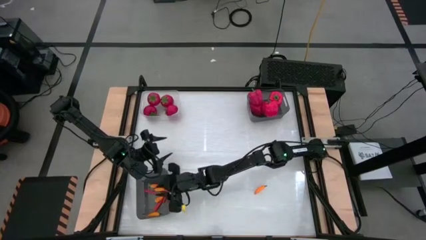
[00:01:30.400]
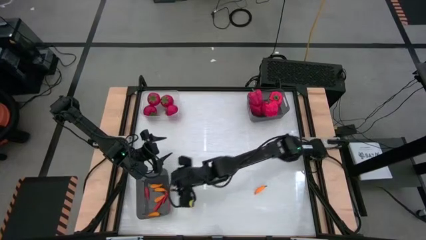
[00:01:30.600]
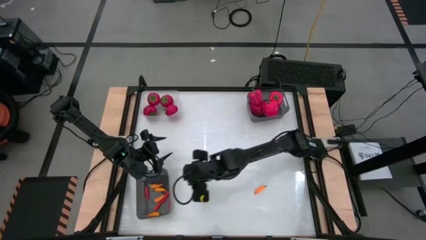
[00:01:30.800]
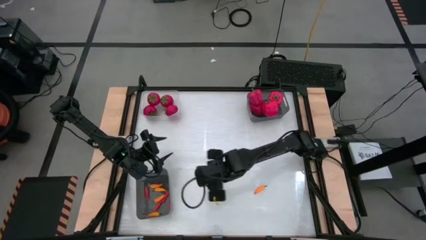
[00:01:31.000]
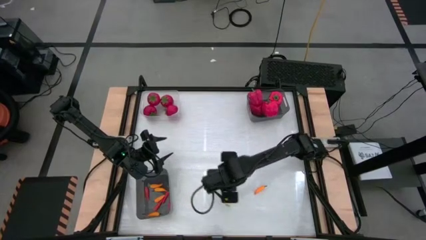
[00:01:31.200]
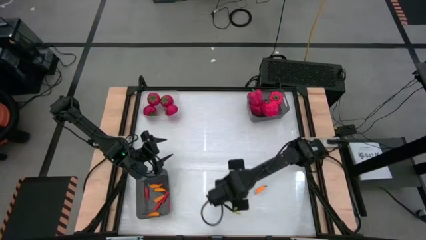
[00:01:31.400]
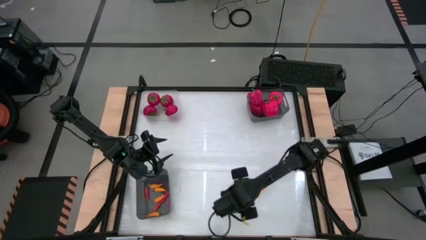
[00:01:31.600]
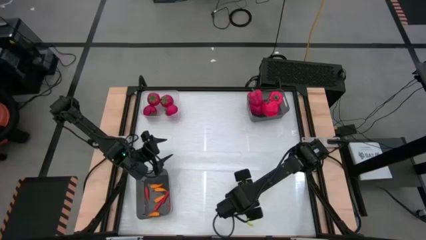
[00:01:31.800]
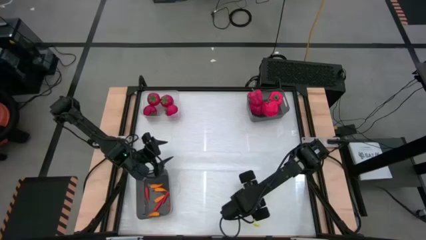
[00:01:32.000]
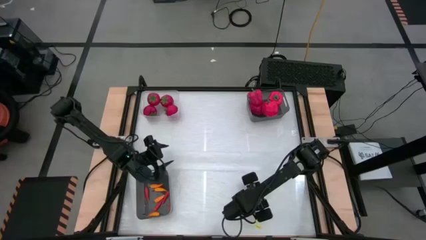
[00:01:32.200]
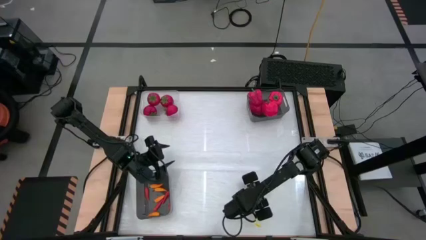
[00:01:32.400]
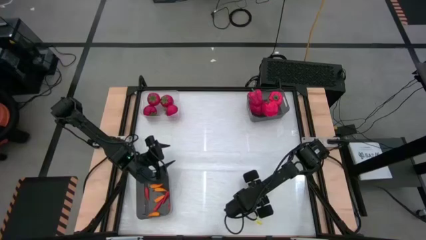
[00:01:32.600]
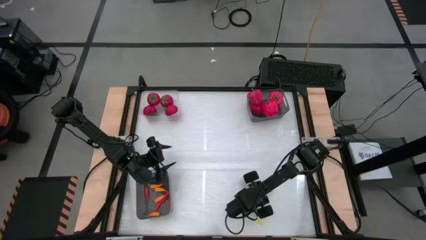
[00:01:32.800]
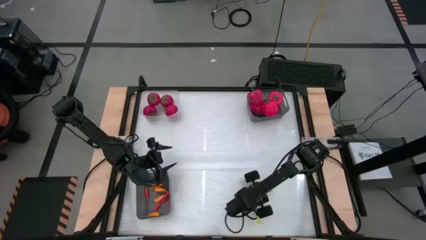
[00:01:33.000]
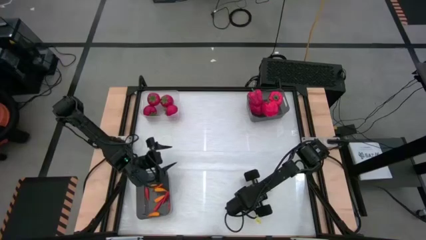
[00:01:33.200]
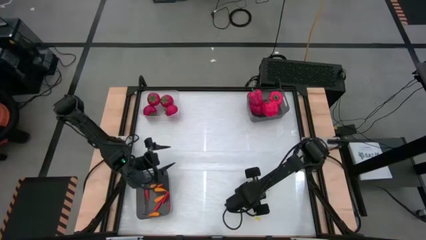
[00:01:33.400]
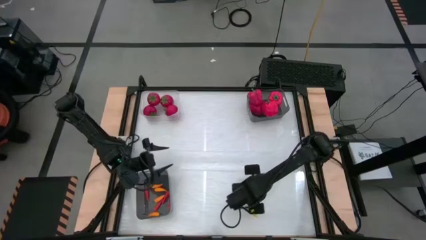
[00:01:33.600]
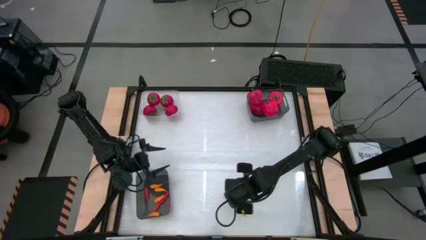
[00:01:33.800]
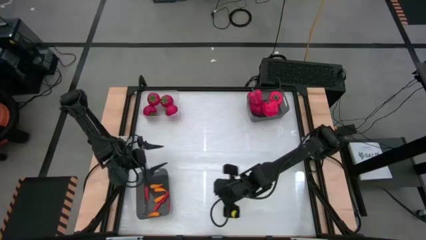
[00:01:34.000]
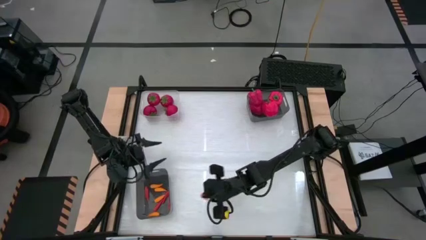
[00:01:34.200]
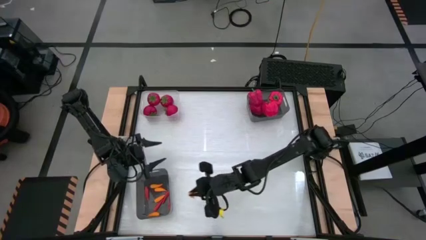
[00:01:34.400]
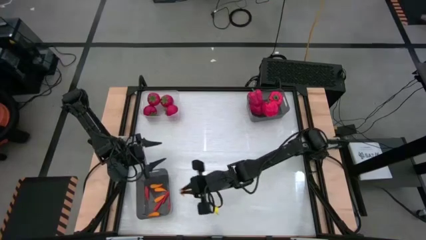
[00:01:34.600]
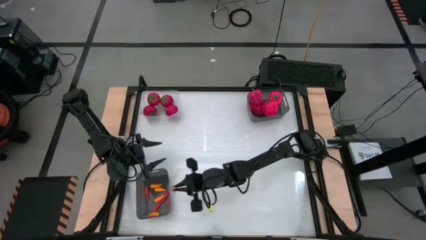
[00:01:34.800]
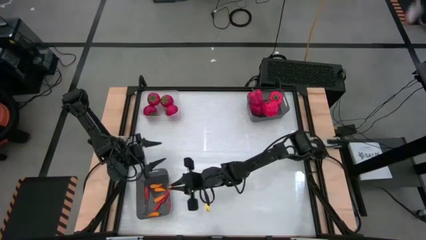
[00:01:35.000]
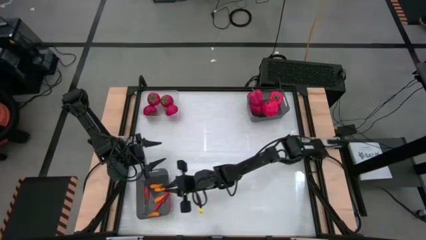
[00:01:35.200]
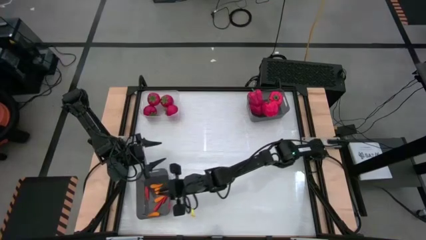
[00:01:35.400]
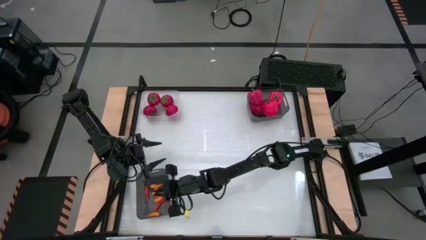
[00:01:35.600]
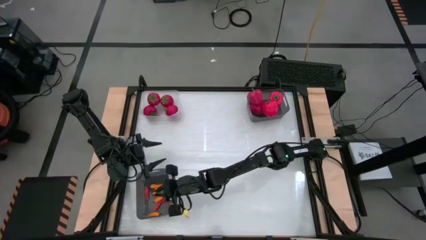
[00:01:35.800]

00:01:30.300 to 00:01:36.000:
Task: Sort produce into baskets
Put the yellow chili pepper into the bottom black bin

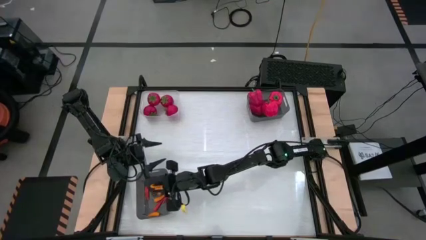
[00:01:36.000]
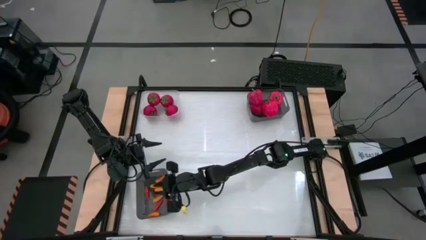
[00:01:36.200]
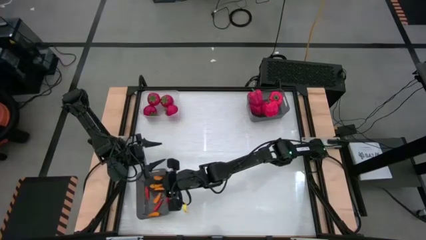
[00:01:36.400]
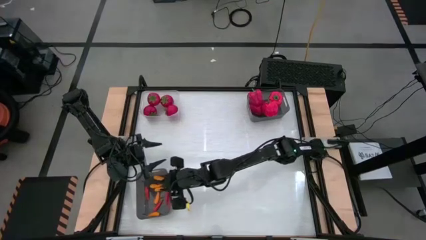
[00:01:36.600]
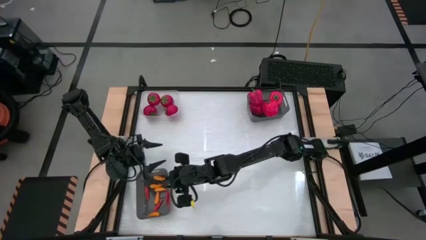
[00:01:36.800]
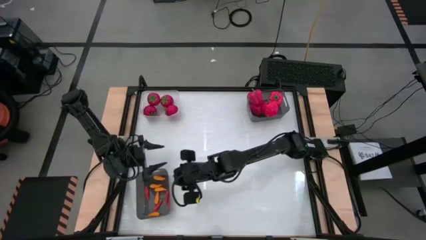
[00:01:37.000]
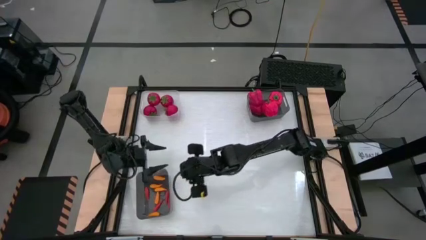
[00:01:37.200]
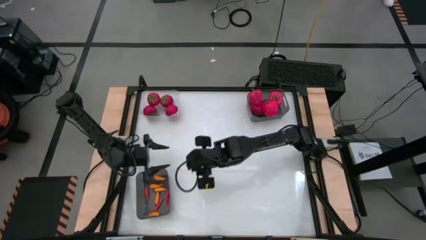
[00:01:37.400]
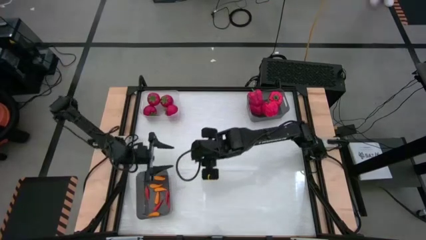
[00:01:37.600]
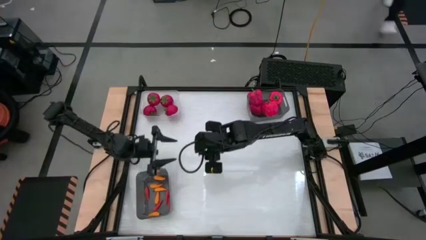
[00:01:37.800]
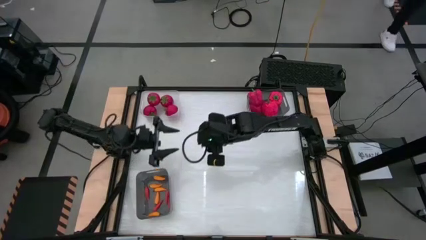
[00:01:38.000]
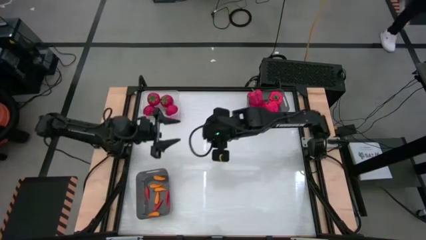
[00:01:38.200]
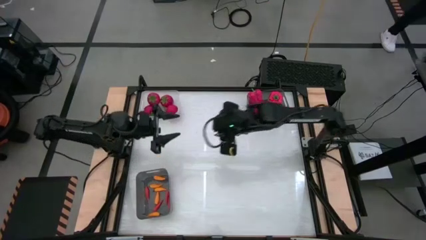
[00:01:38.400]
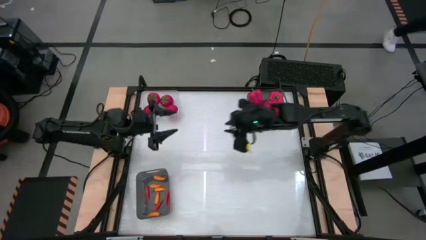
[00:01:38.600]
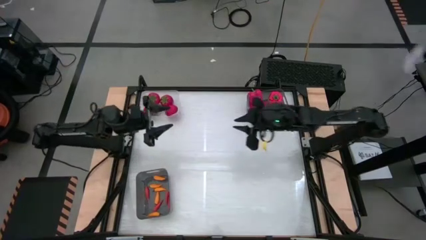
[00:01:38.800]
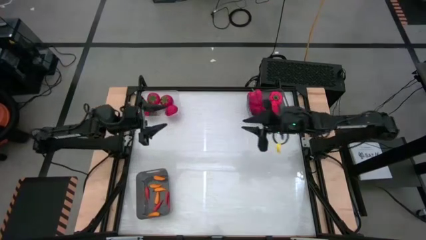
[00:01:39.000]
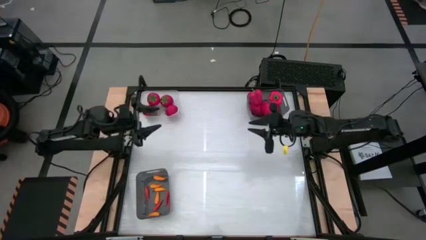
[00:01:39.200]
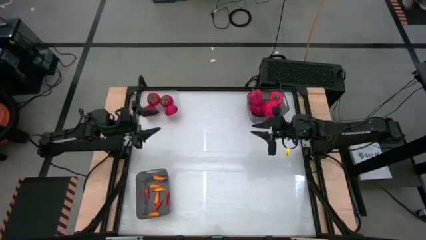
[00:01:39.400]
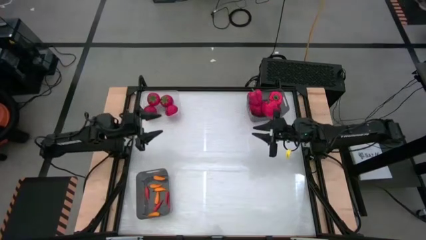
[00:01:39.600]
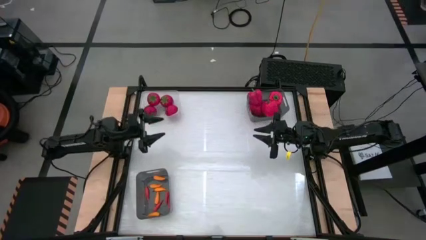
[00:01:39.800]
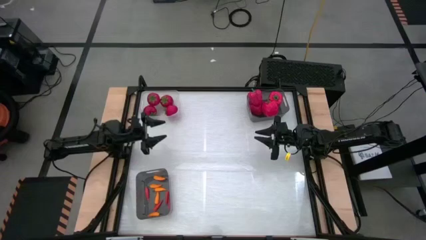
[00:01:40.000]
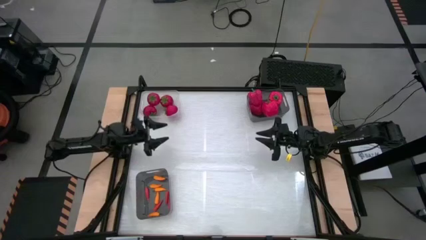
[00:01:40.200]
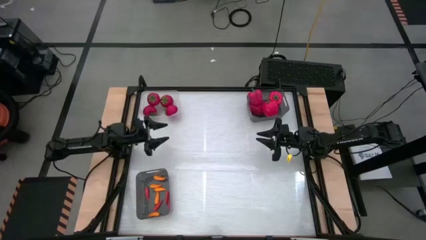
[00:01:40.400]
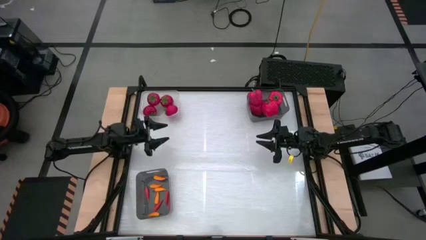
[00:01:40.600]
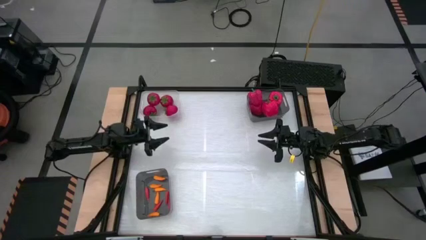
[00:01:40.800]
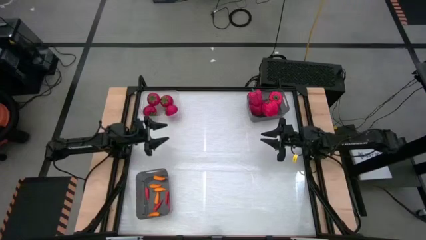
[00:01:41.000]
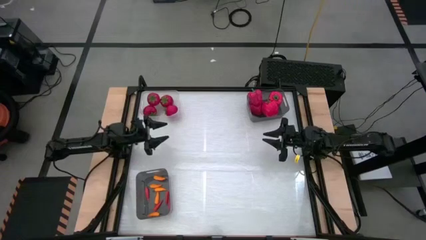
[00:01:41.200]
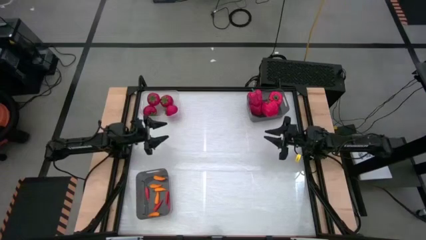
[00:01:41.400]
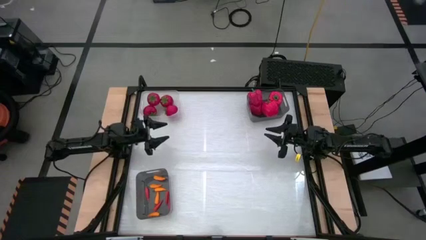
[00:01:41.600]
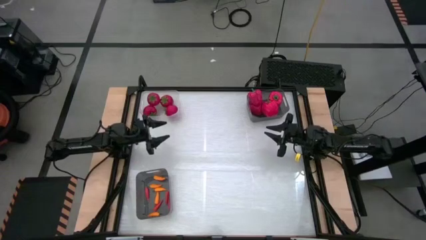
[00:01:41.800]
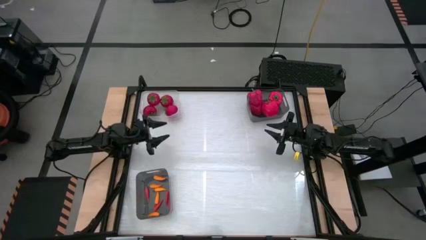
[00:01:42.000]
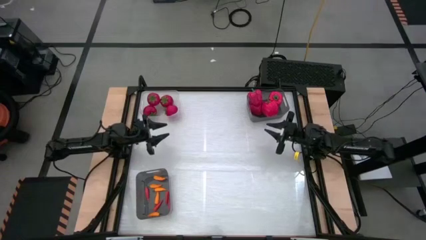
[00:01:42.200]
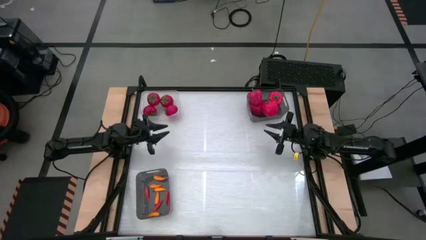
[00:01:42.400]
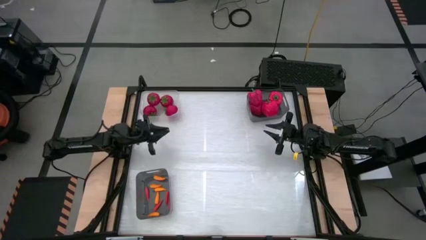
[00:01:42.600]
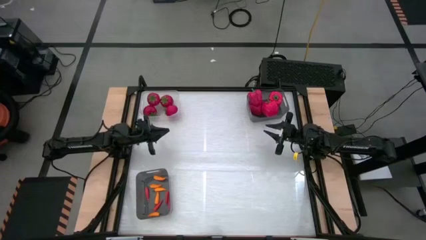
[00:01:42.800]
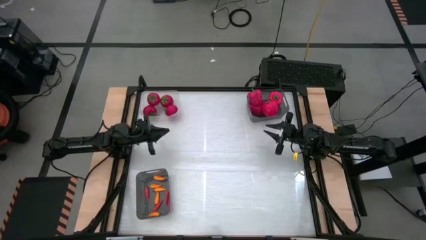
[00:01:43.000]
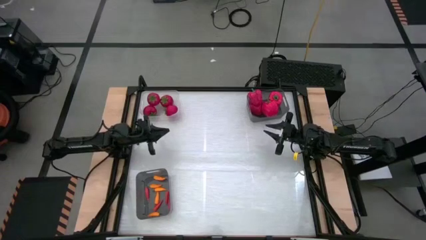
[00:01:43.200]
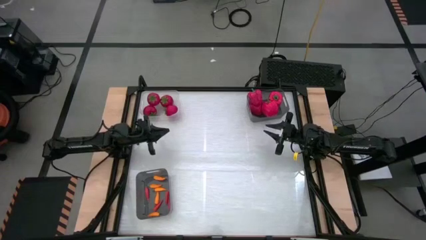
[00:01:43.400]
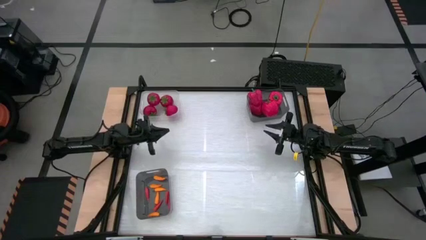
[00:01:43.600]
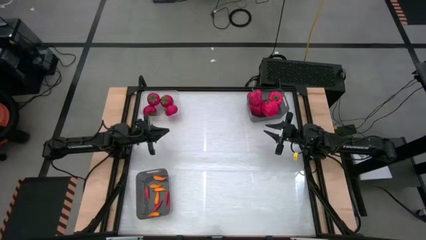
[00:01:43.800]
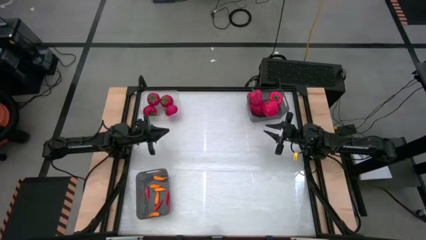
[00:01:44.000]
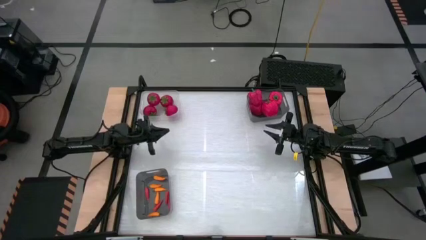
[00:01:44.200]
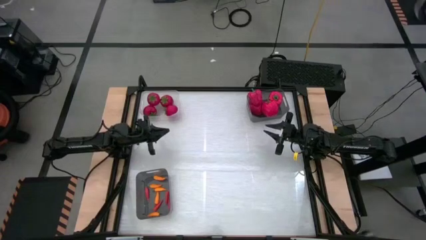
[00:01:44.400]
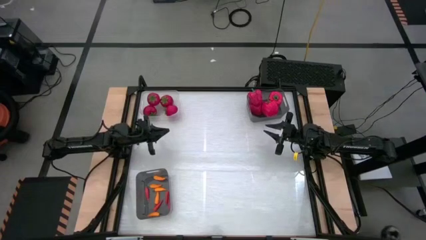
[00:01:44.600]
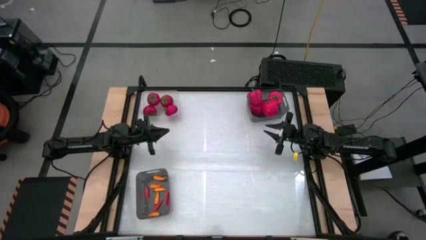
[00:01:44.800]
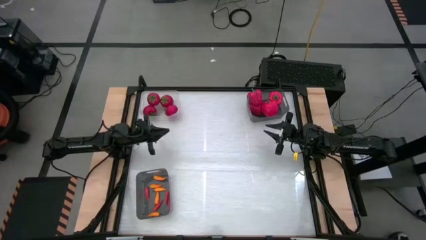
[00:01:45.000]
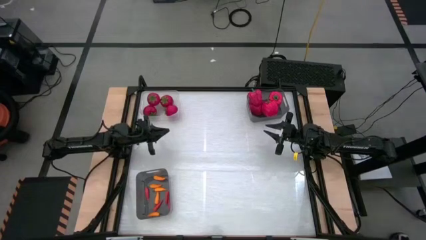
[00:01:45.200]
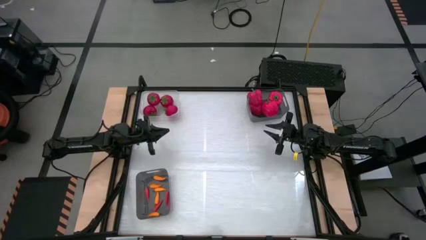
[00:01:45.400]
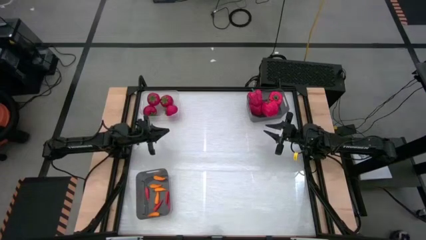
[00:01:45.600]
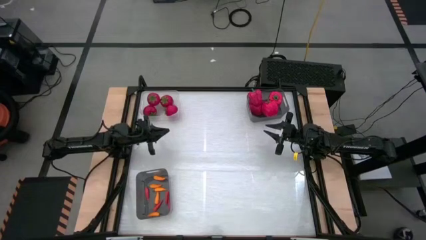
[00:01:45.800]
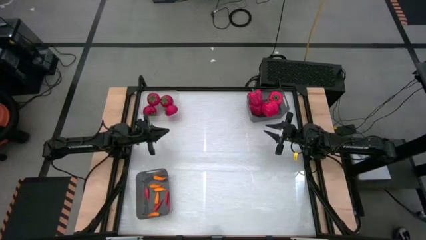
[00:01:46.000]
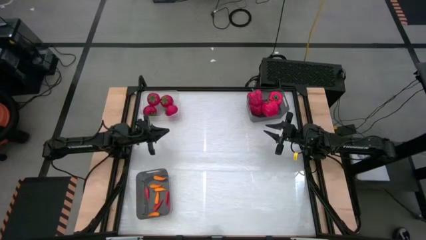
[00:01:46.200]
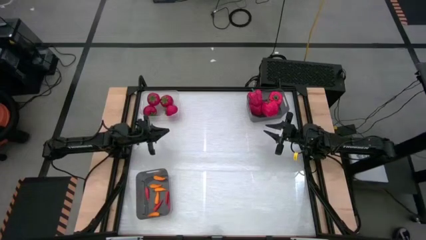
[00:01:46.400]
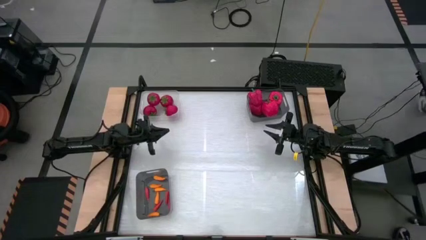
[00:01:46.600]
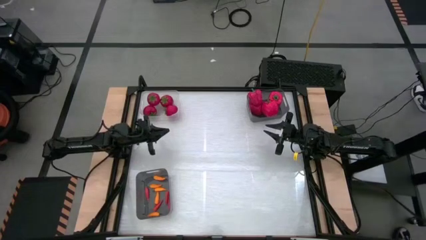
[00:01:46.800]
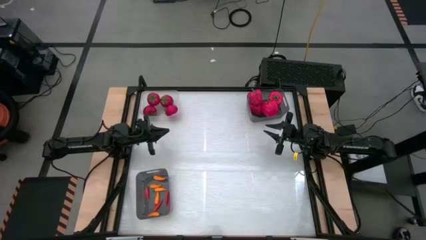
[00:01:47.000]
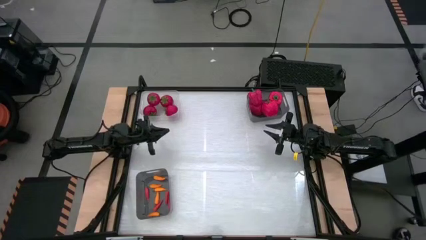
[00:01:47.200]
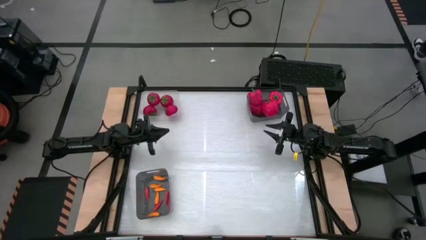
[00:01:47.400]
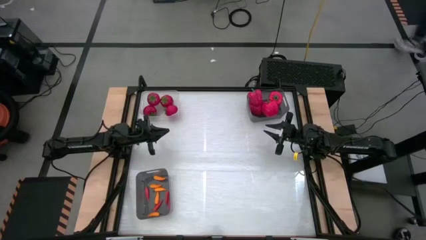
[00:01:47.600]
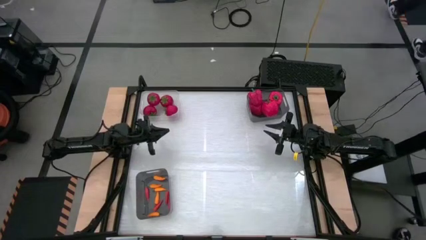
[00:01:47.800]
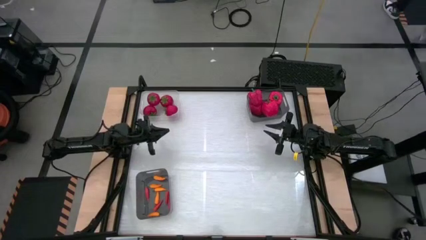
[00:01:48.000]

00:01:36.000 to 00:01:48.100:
Return to Home Position
